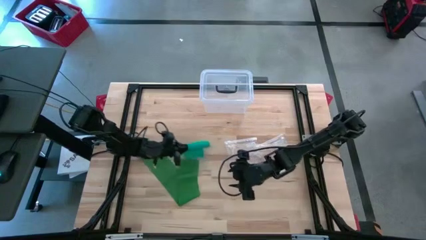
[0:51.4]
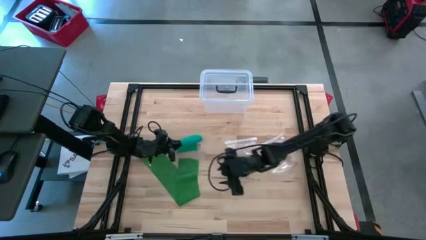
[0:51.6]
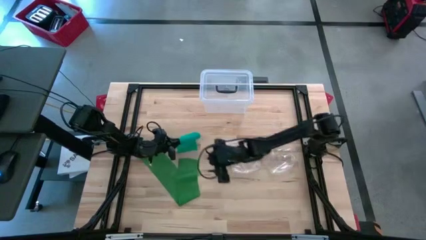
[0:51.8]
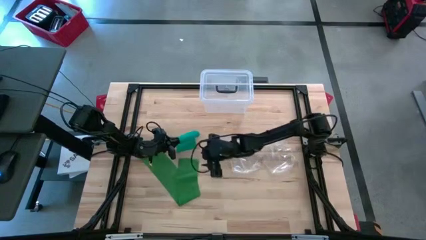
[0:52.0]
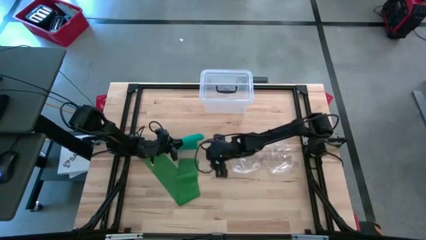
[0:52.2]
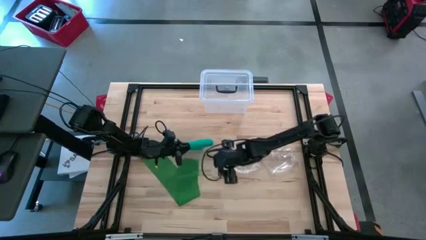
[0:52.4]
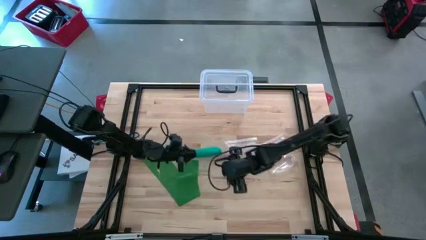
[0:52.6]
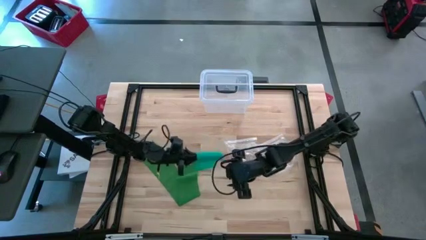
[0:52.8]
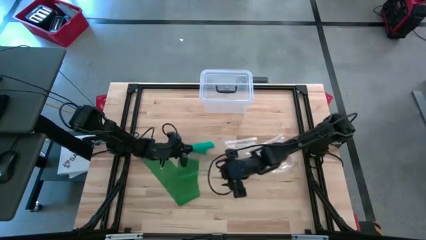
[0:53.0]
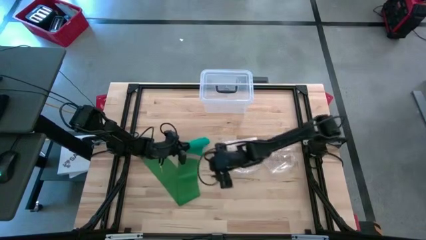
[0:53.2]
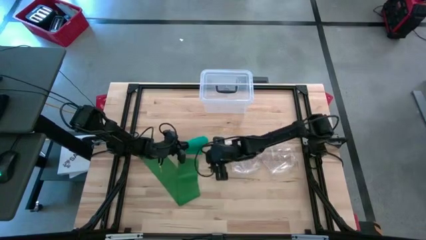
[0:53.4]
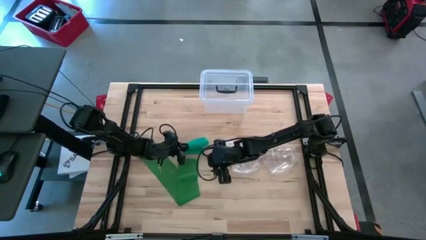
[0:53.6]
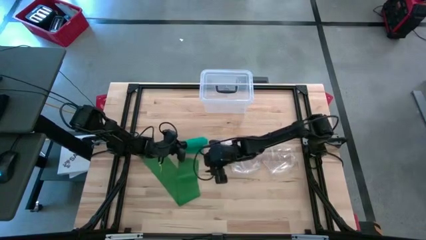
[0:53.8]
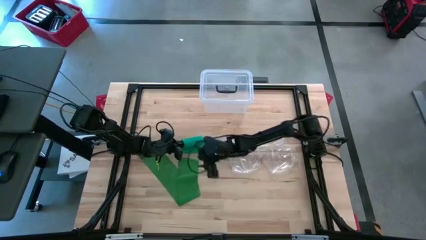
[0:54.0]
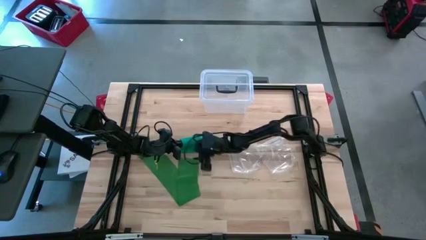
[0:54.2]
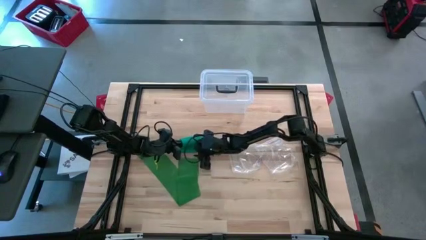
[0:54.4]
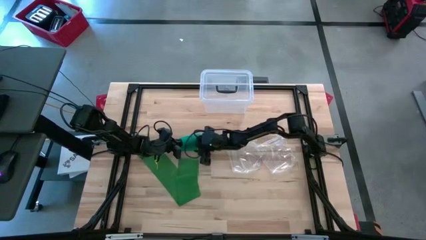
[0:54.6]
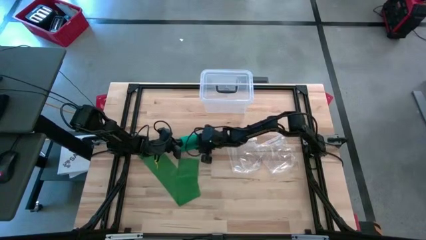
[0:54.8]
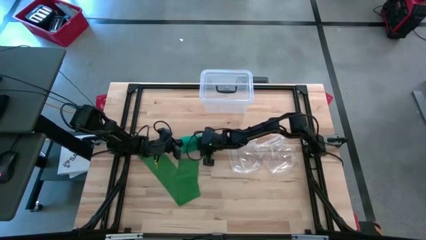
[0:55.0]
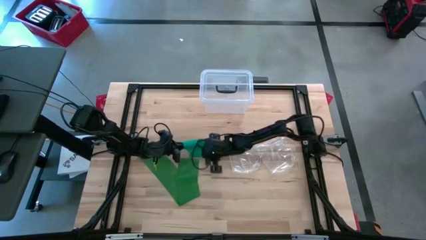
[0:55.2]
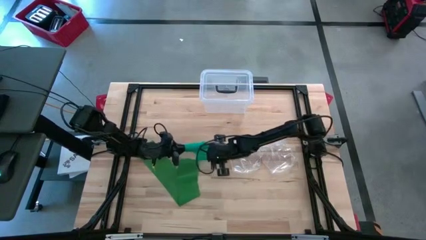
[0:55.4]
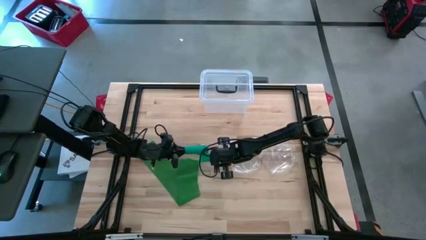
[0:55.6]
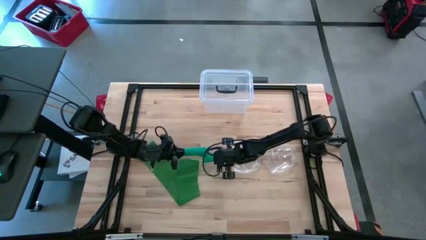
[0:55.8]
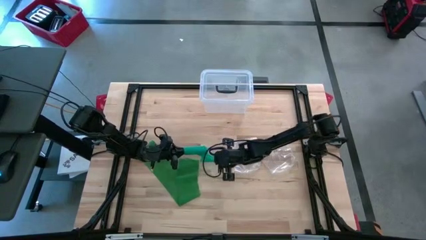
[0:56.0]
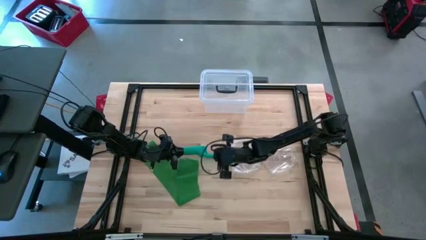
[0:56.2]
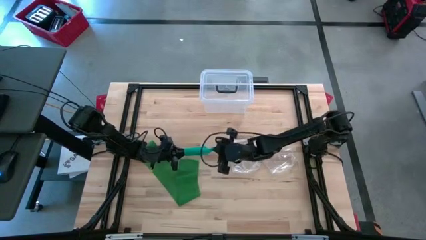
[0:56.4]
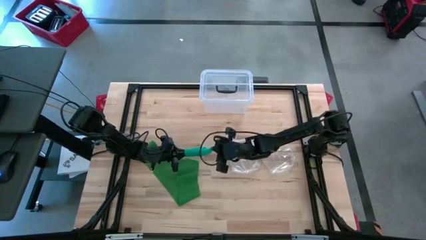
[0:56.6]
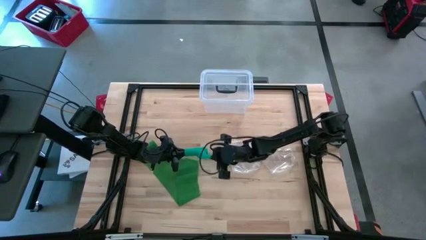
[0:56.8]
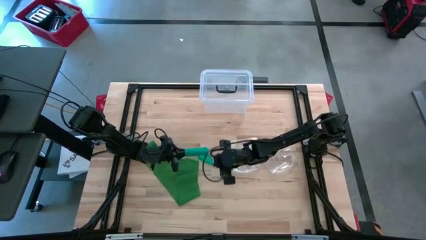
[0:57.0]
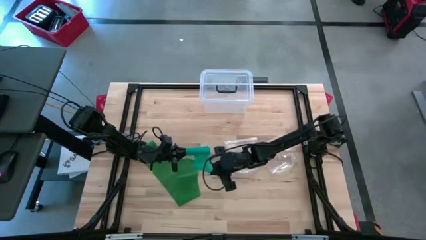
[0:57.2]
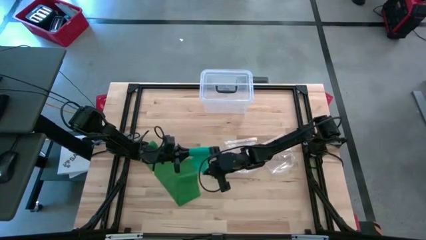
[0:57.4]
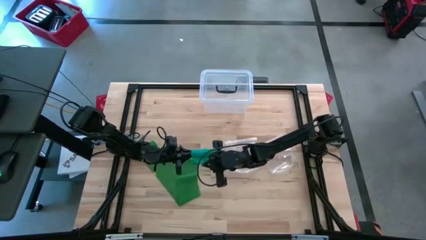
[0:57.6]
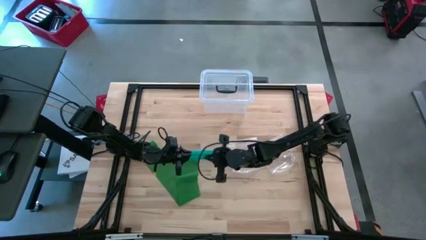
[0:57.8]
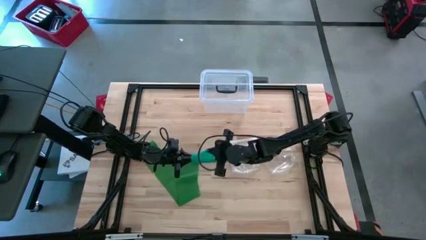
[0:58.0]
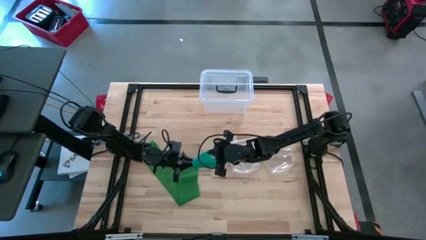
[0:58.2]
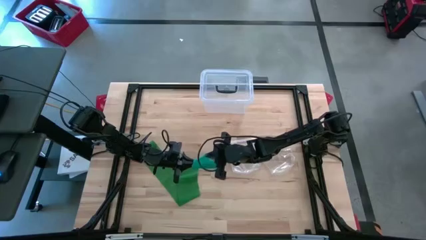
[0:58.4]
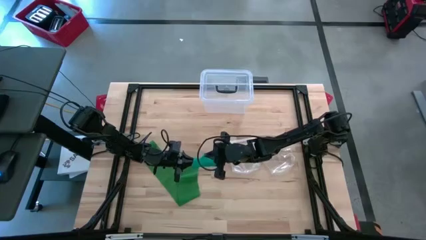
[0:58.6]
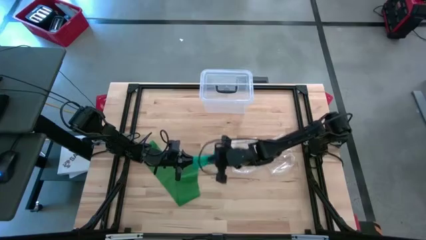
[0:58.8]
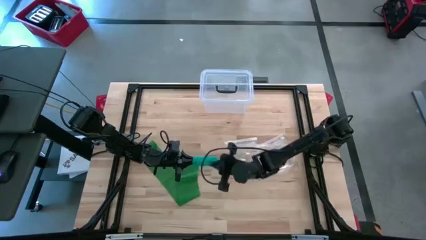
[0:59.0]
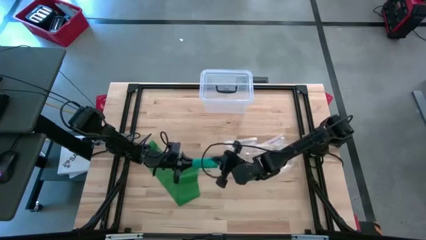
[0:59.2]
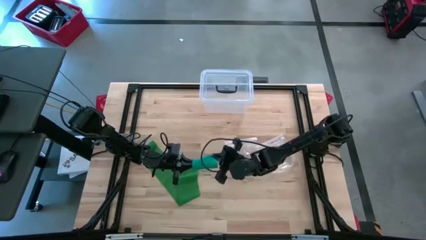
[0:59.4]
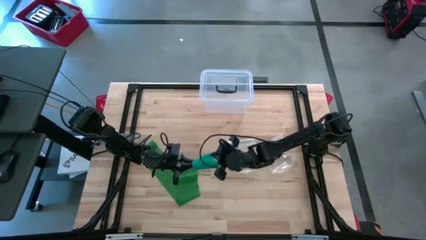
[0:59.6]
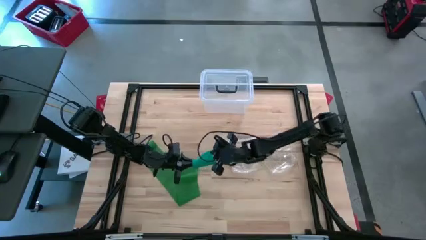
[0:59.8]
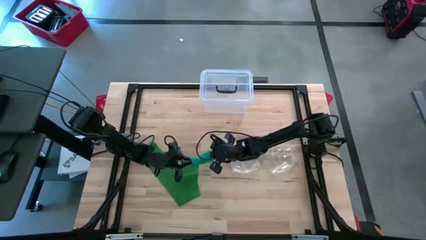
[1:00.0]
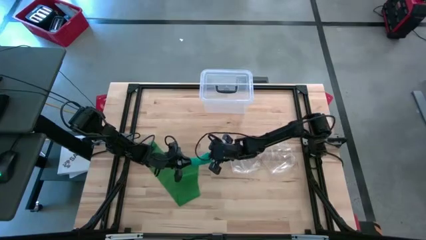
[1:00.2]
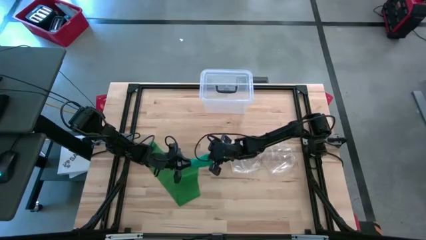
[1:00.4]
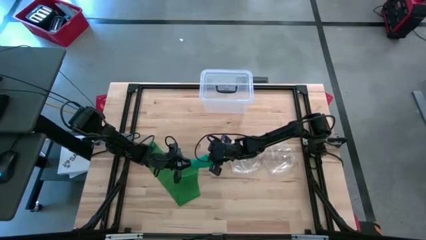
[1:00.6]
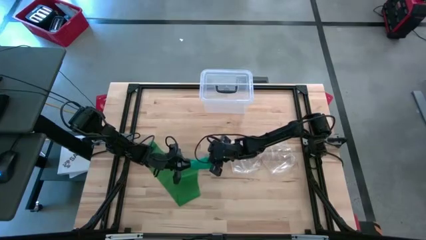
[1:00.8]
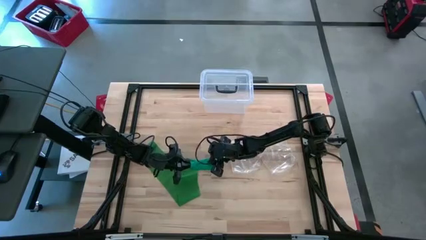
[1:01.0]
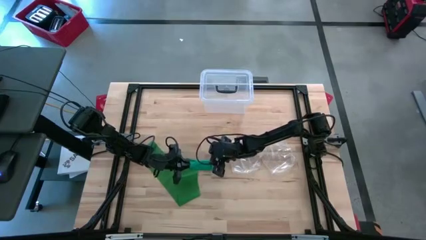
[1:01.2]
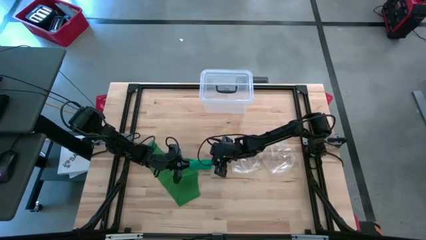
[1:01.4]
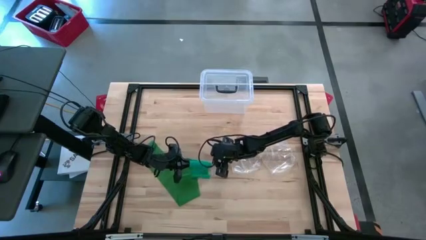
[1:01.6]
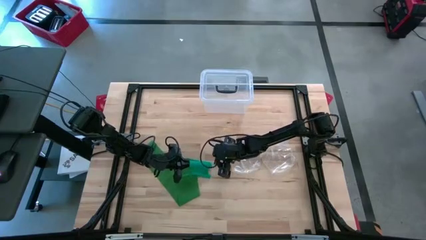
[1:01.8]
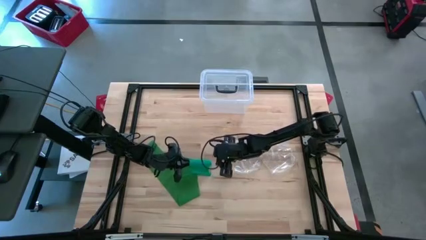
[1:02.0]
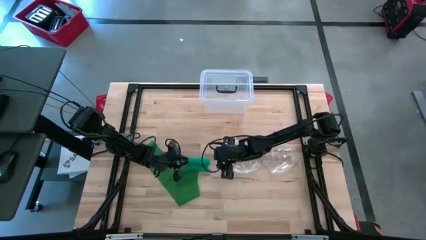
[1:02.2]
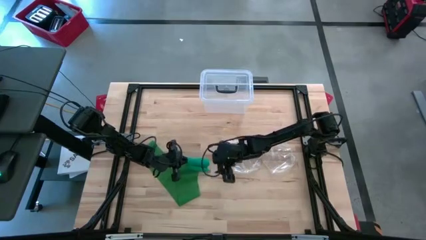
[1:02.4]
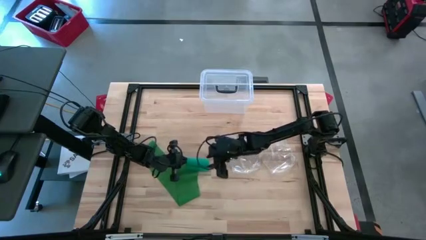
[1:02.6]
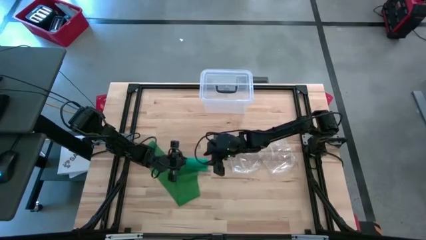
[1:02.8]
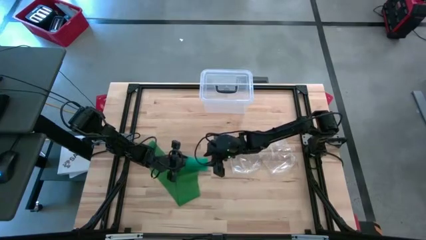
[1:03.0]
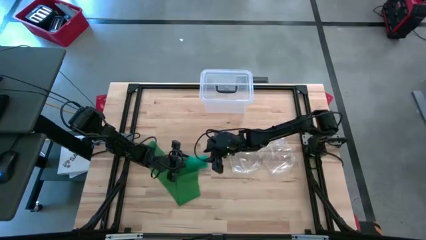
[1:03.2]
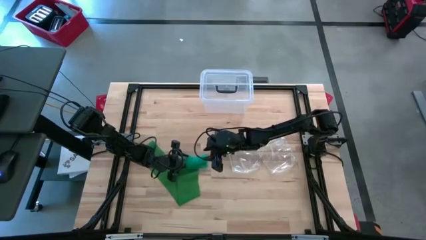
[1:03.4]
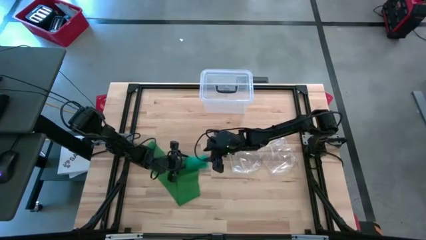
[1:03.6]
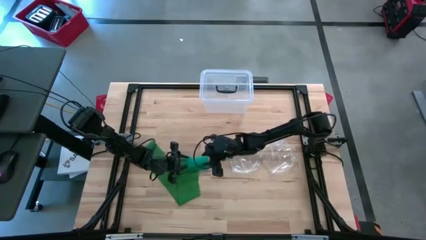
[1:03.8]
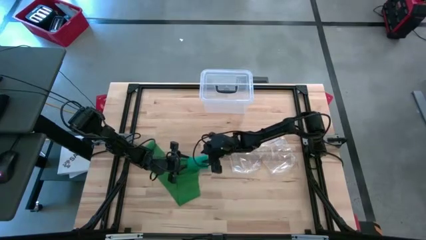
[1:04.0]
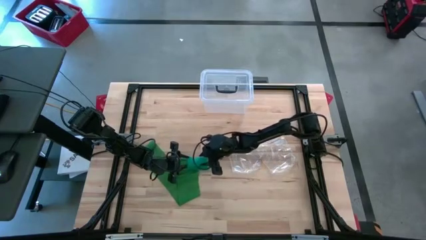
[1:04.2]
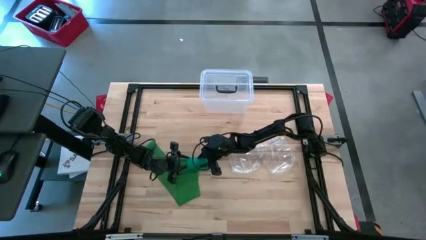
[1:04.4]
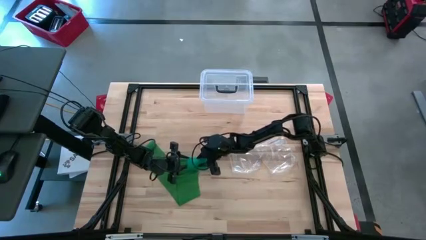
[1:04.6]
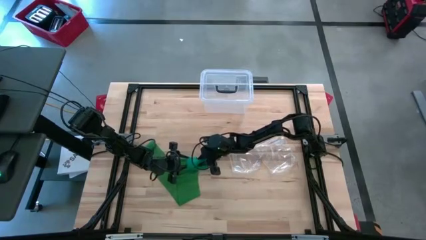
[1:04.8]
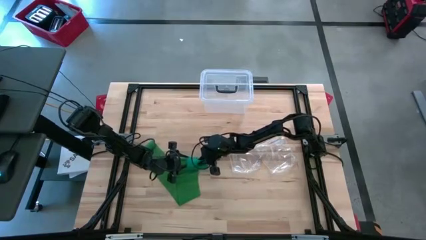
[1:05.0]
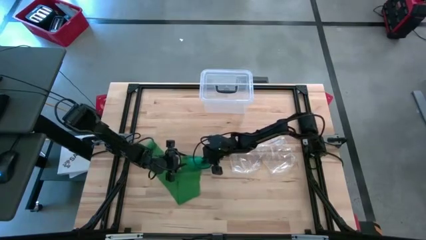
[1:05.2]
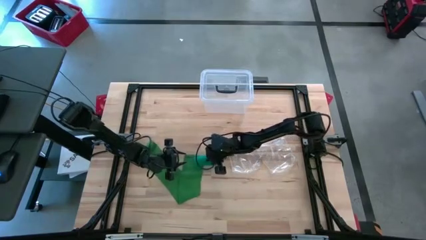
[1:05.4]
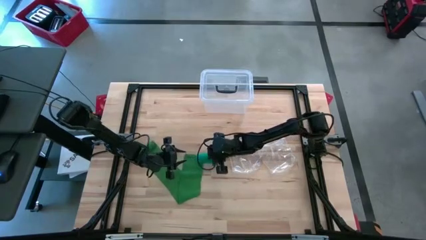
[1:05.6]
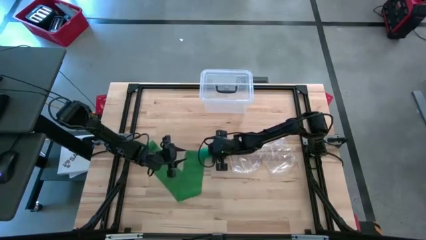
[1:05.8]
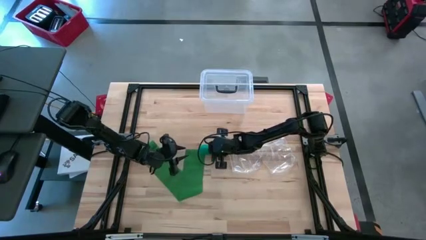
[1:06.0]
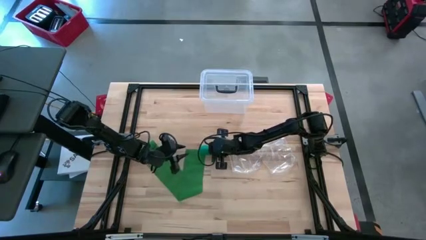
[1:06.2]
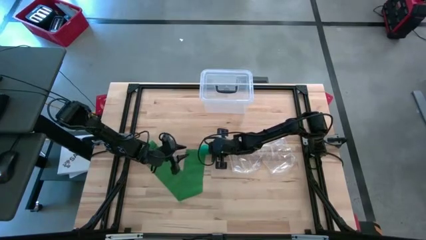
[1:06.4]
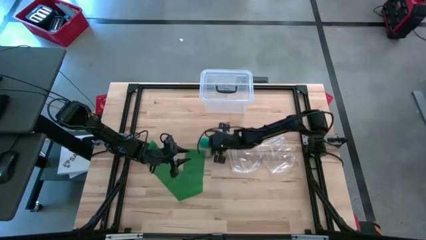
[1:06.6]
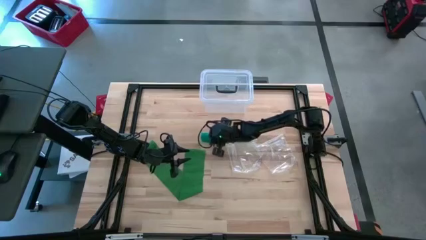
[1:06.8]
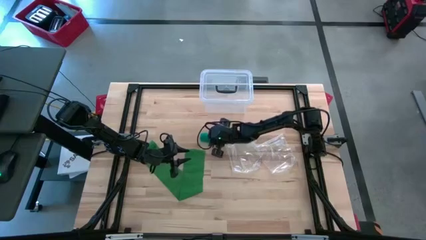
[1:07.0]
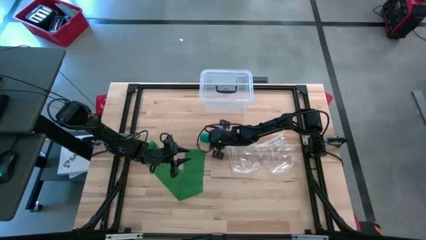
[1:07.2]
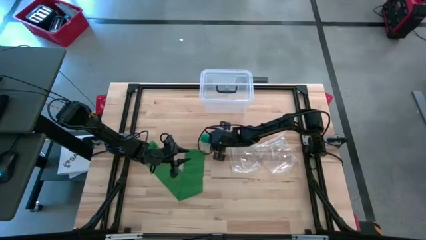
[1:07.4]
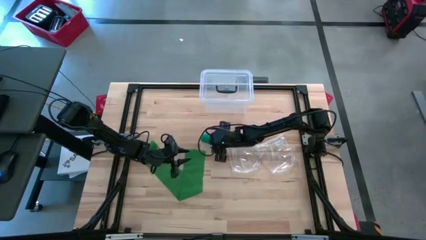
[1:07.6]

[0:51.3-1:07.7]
Task: Roll bandage
Roll the blue bandage
